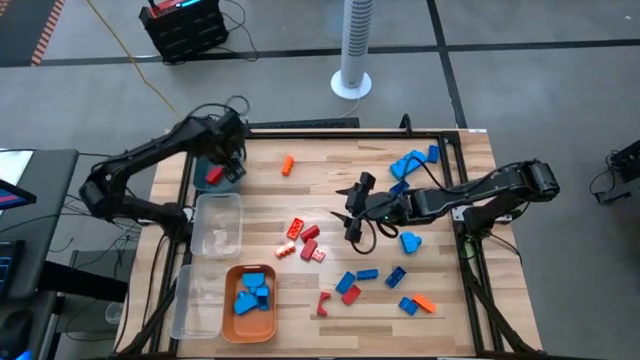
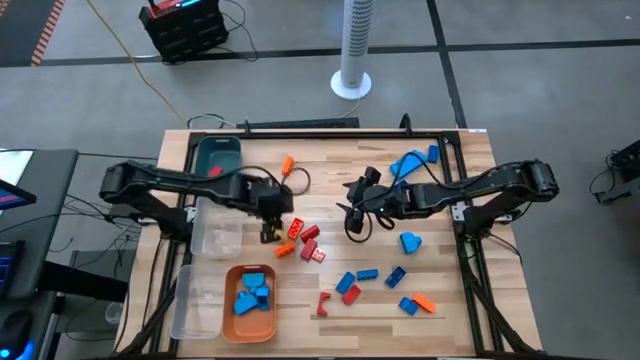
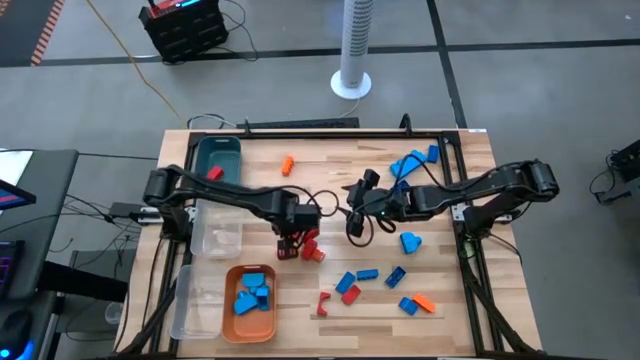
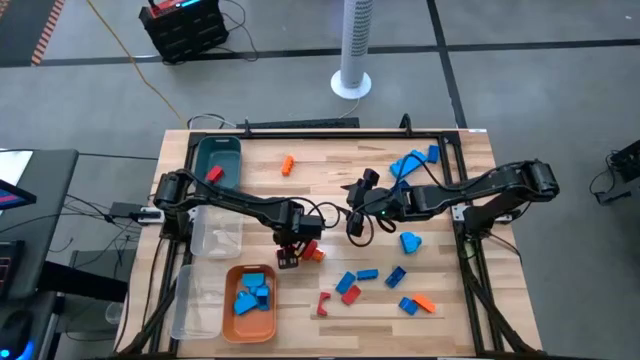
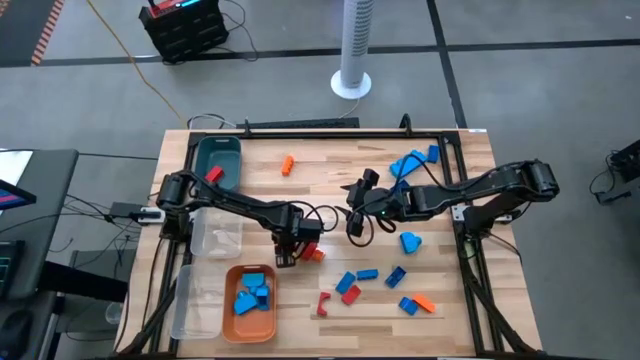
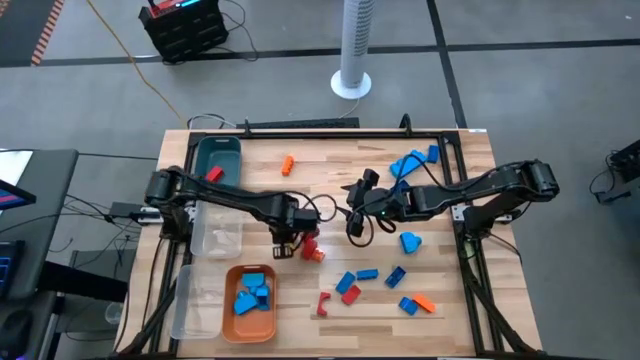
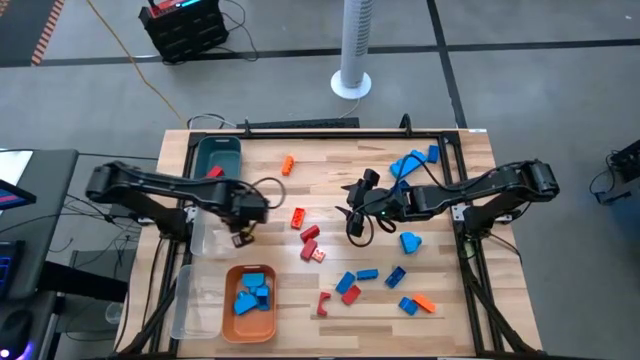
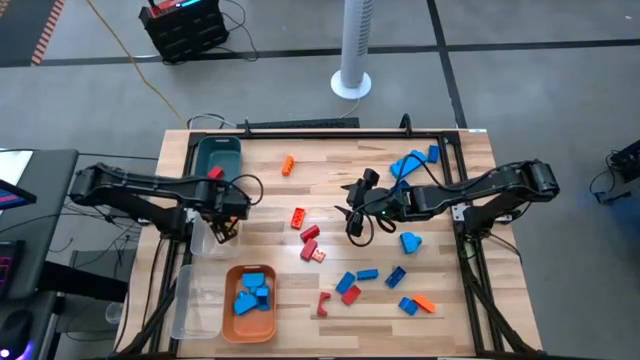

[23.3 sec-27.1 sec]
Task: Sort blocks
Put the orange game piece into the top transparent bin

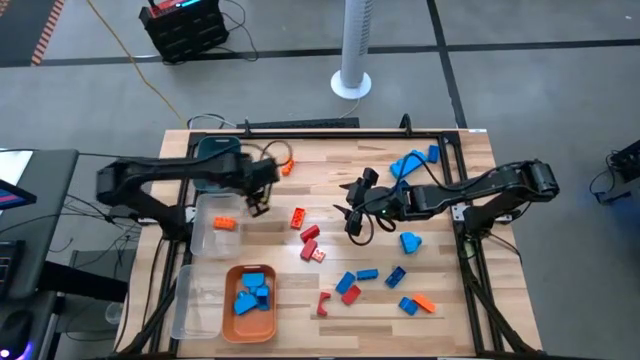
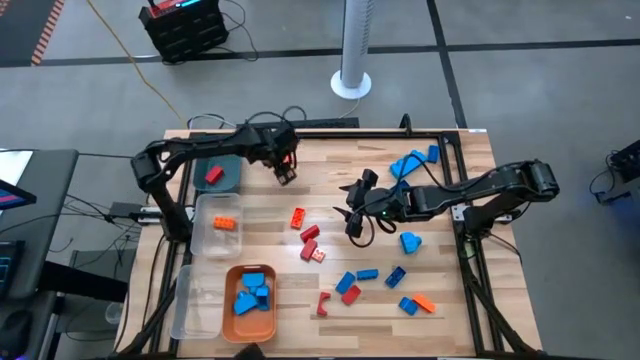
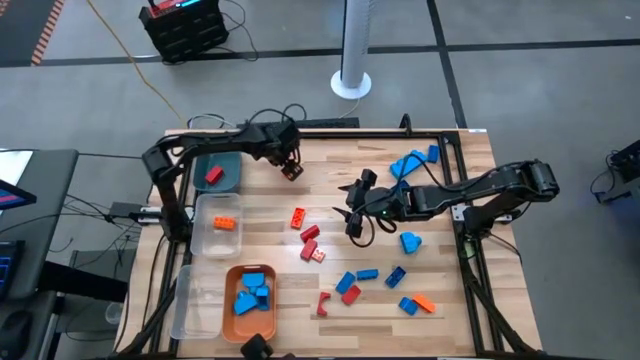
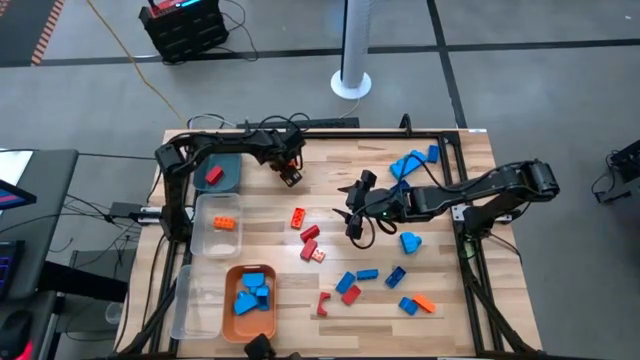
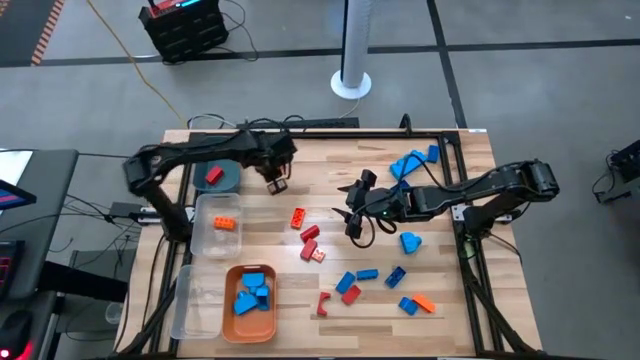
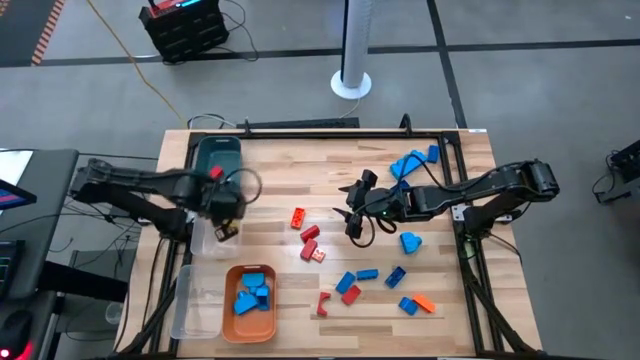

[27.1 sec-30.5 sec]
Put the orange game piece into the top transparent bin

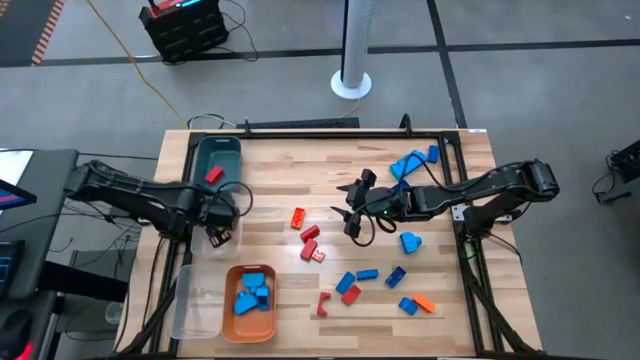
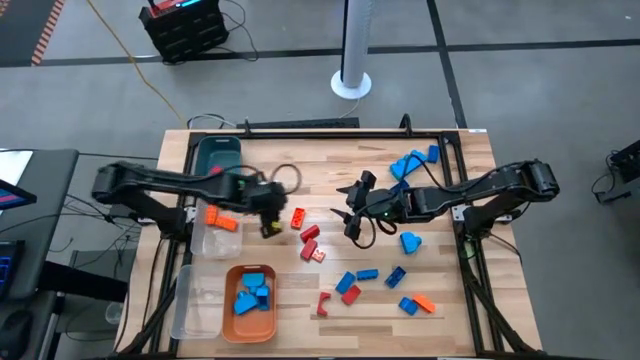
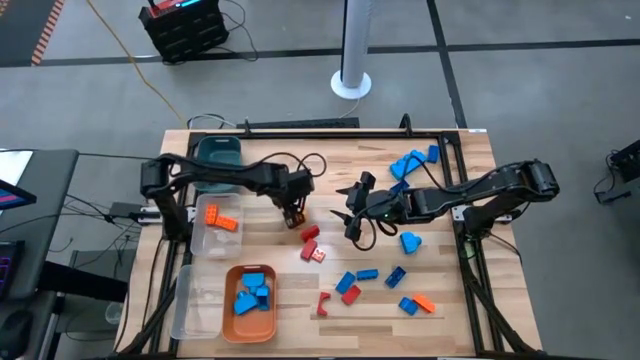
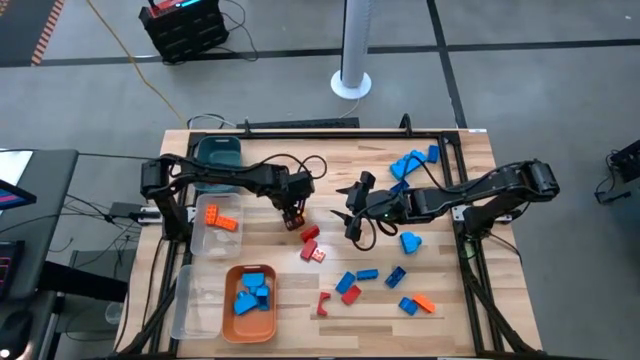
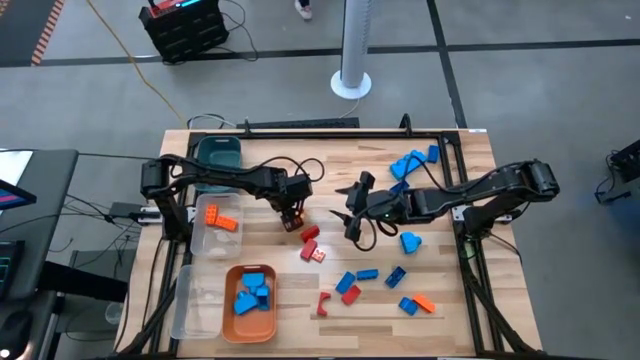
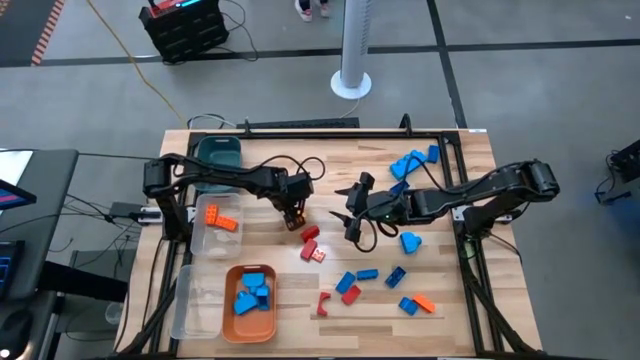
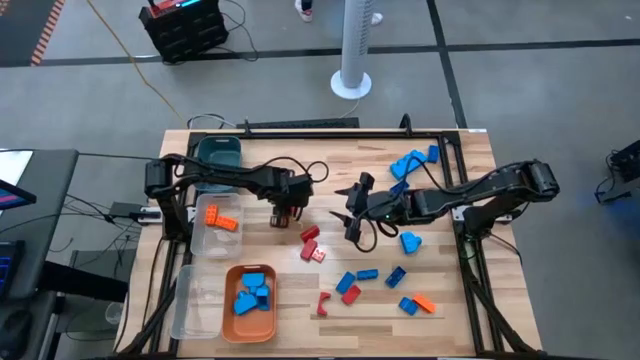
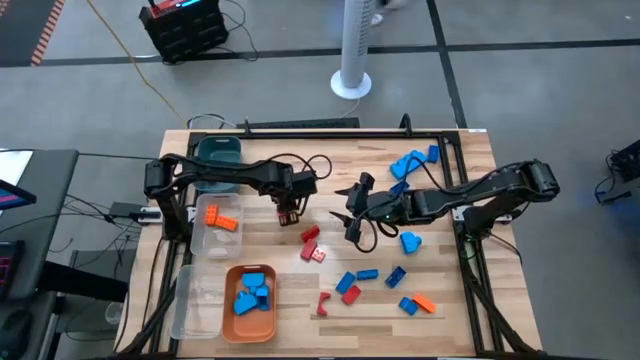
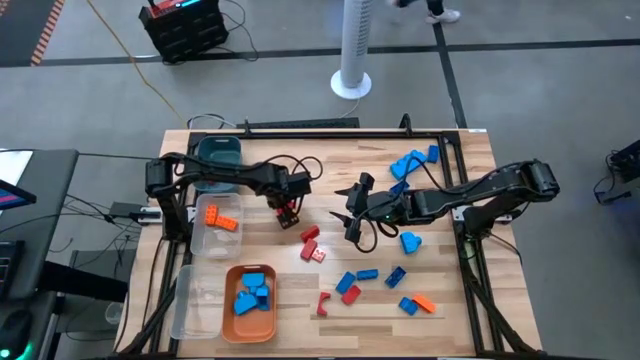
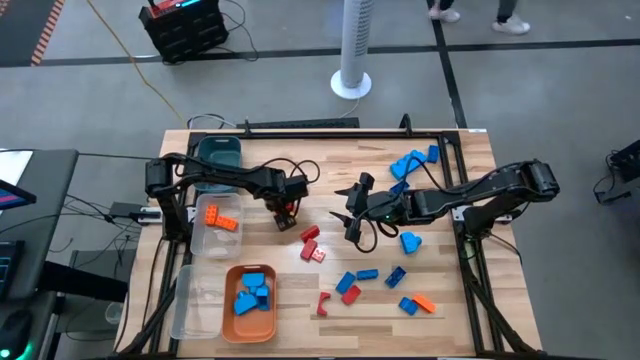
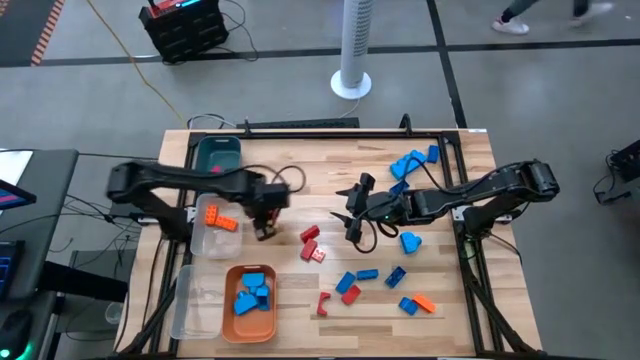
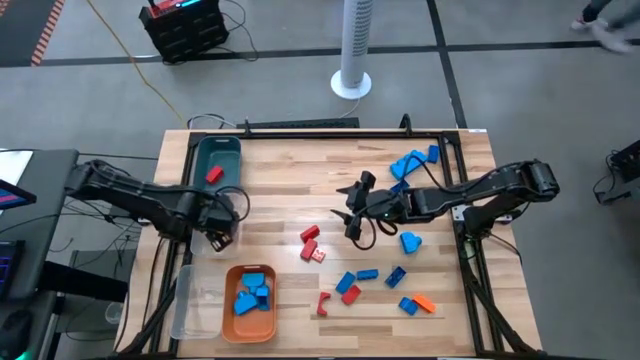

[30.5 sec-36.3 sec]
Put the orange game piece into the top transparent bin

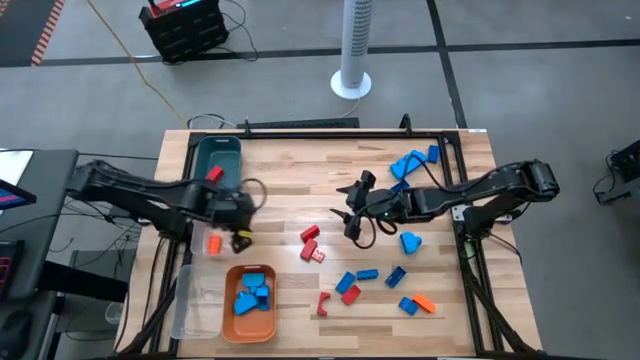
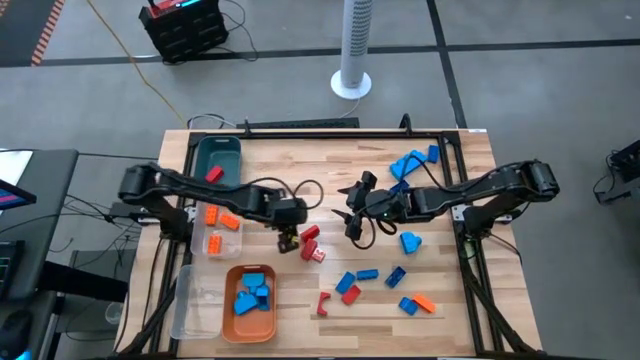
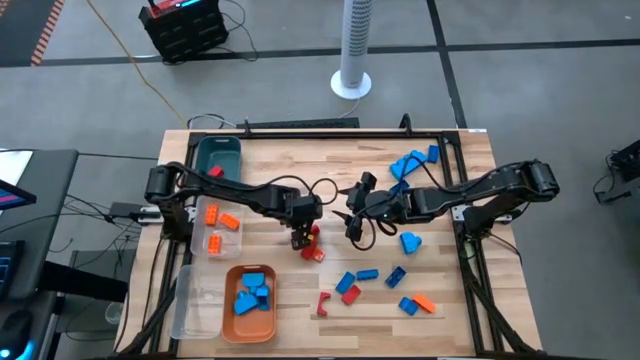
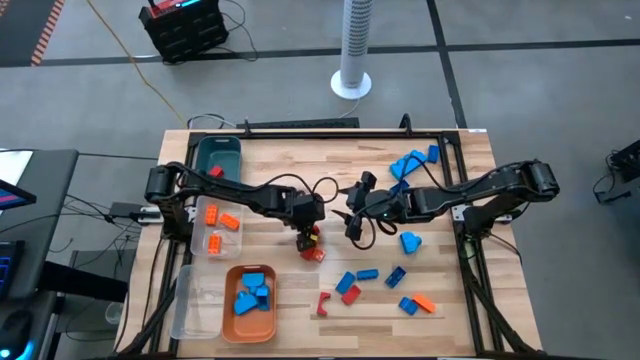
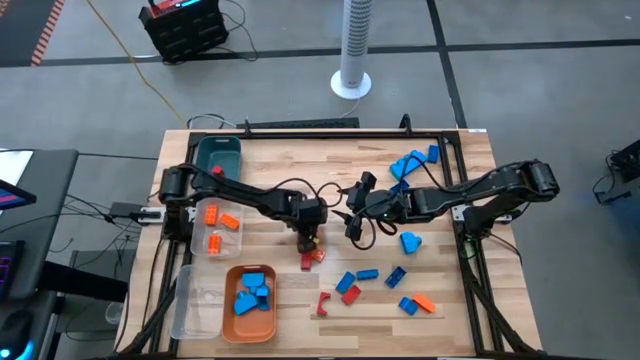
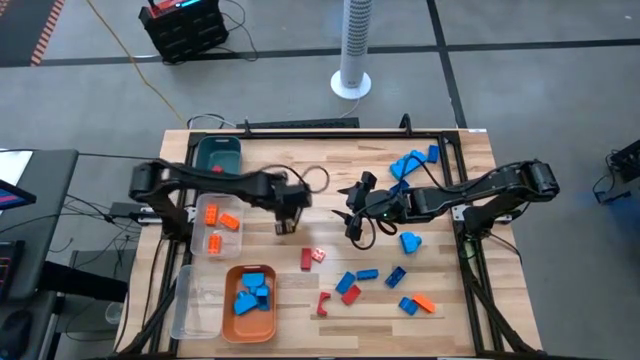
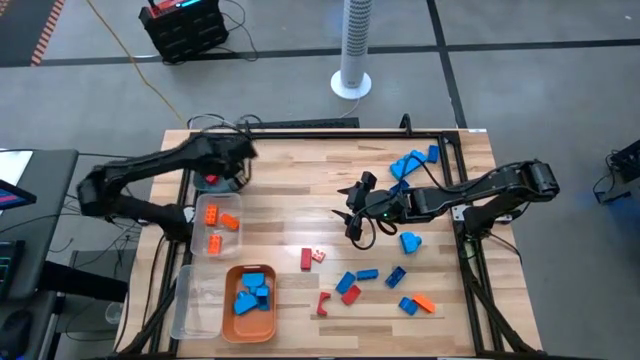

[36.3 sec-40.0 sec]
Put the red block into the blue bin

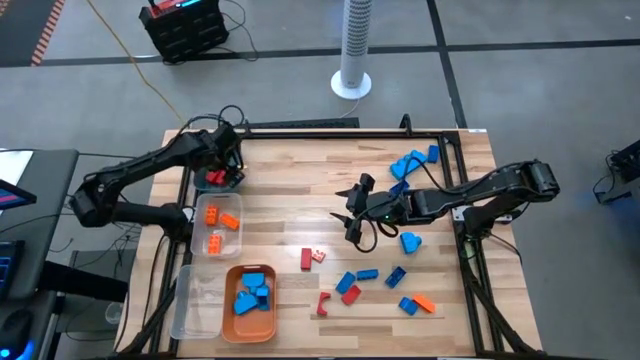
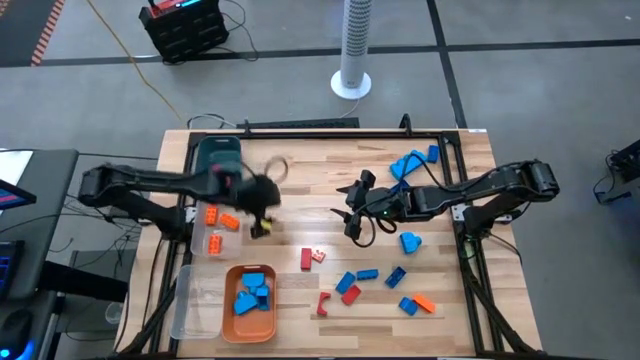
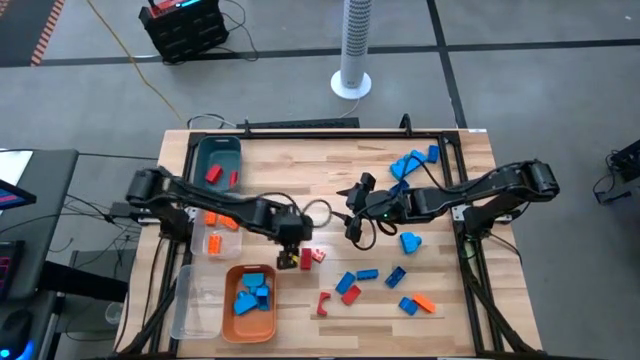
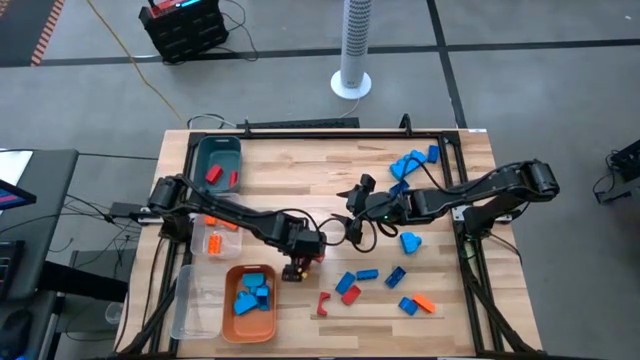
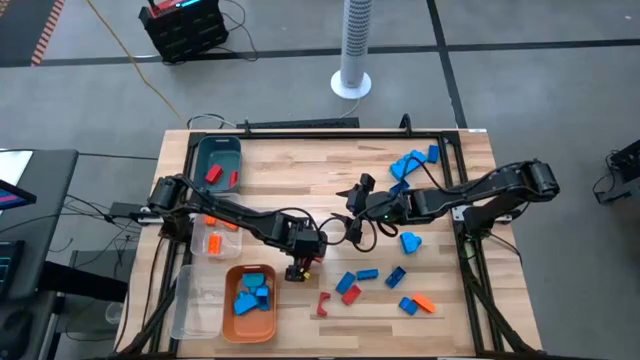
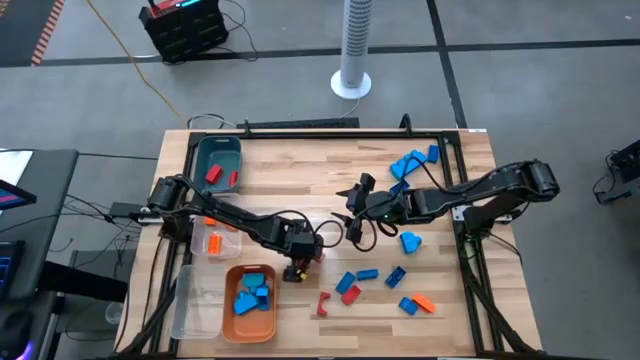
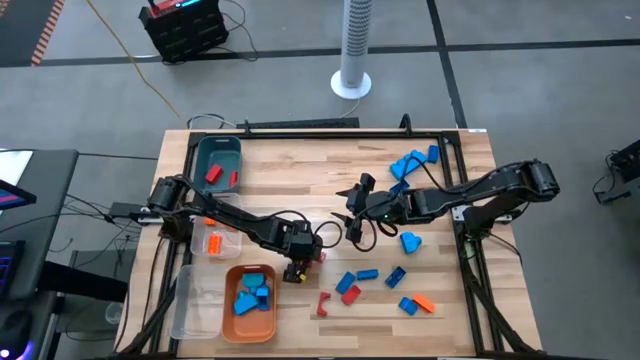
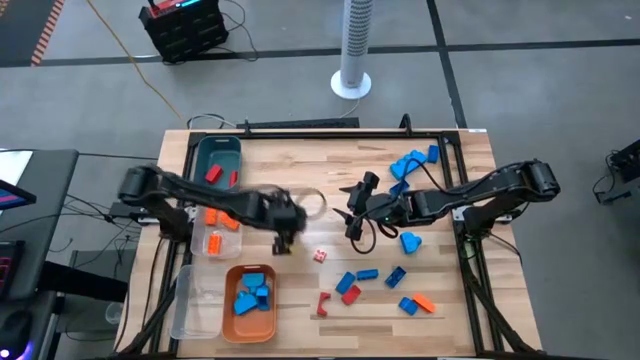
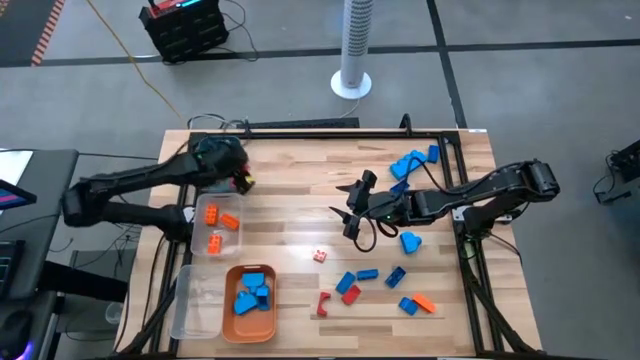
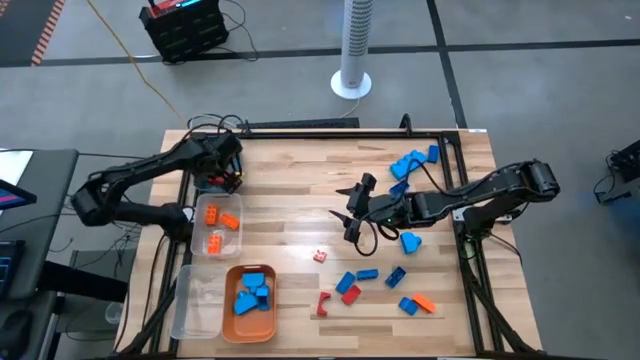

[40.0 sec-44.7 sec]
Put the red block into the blue bin
